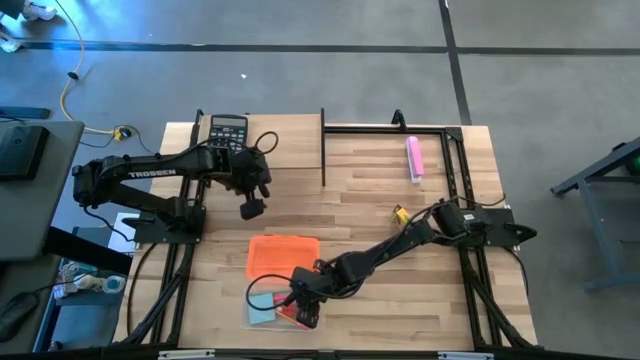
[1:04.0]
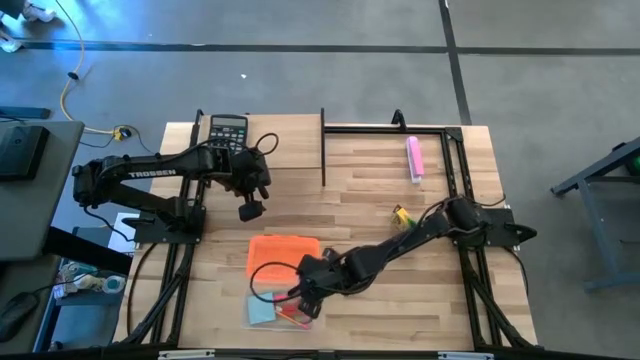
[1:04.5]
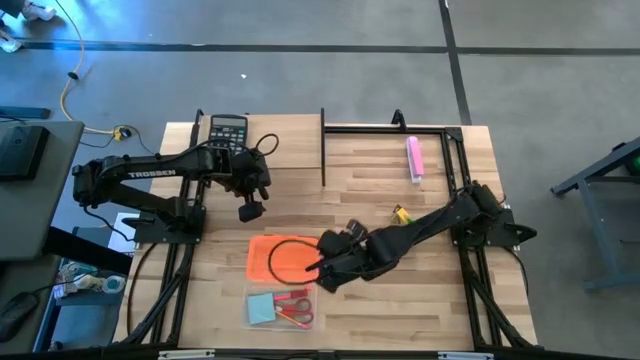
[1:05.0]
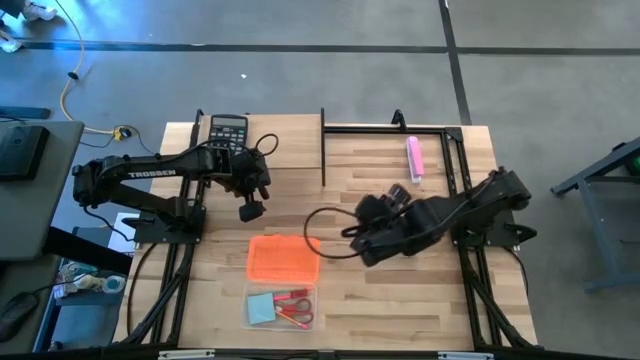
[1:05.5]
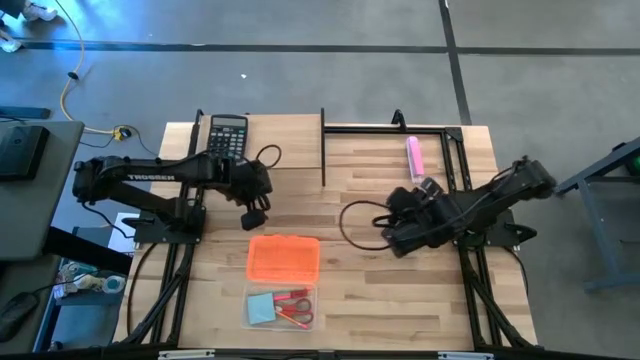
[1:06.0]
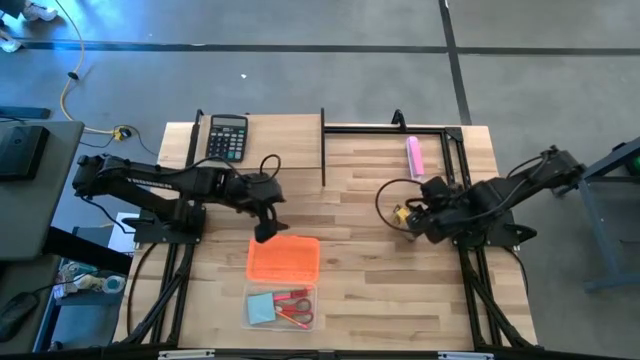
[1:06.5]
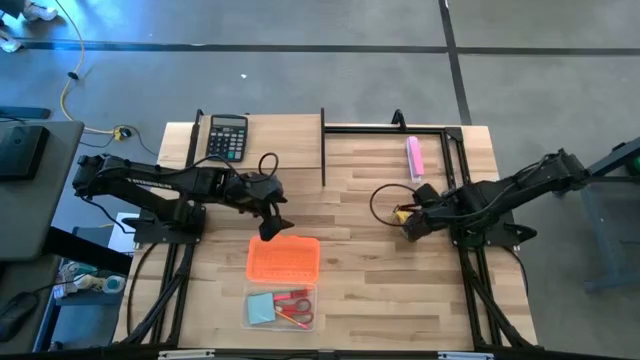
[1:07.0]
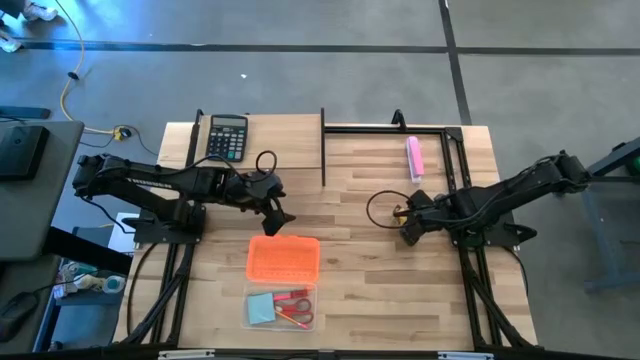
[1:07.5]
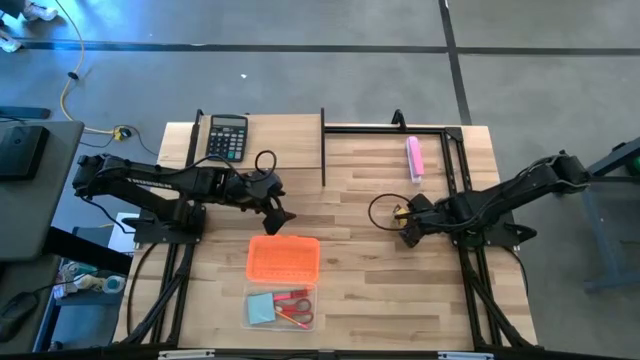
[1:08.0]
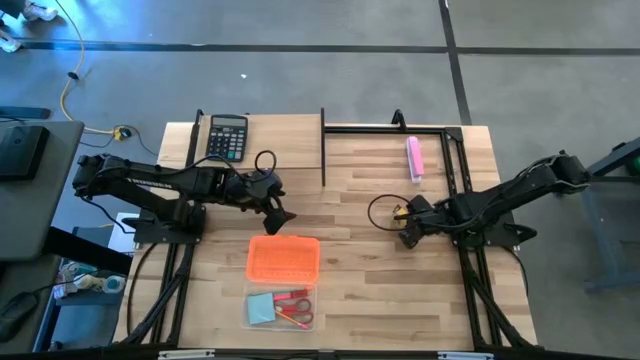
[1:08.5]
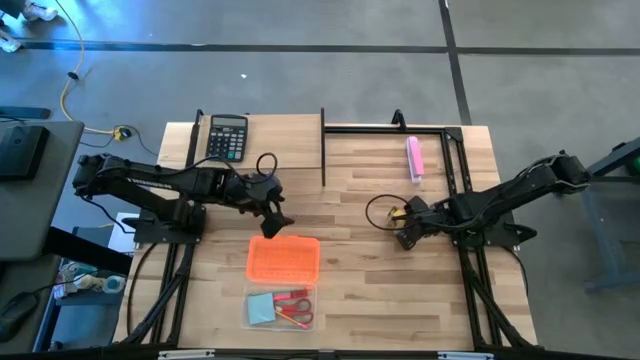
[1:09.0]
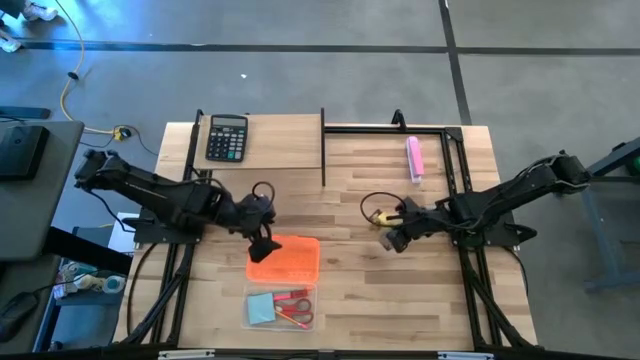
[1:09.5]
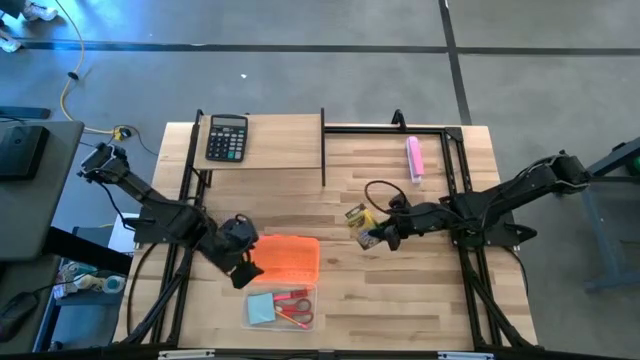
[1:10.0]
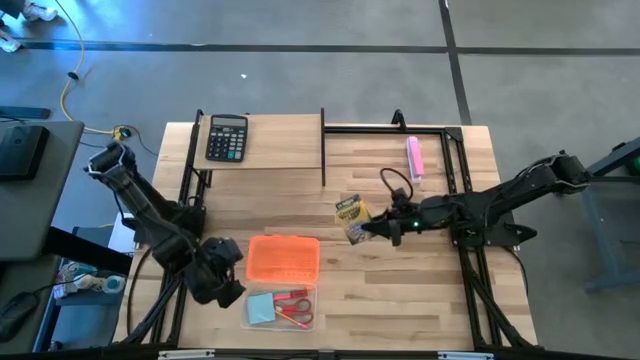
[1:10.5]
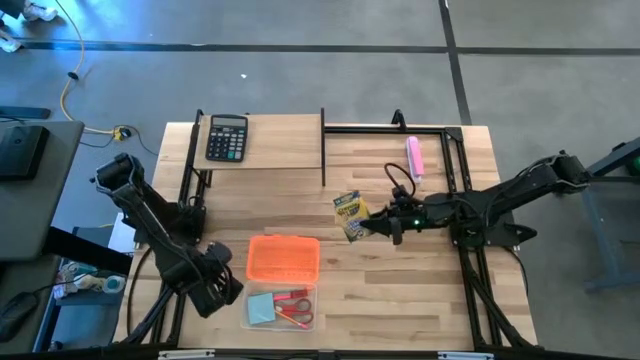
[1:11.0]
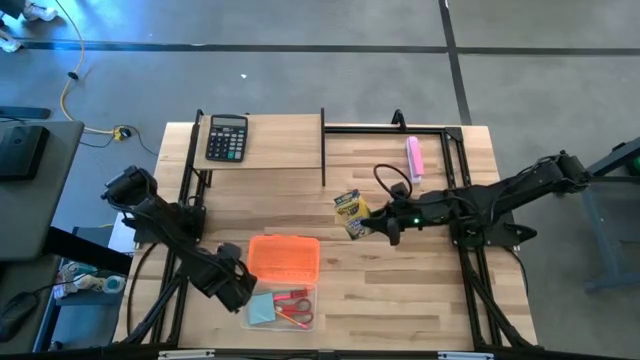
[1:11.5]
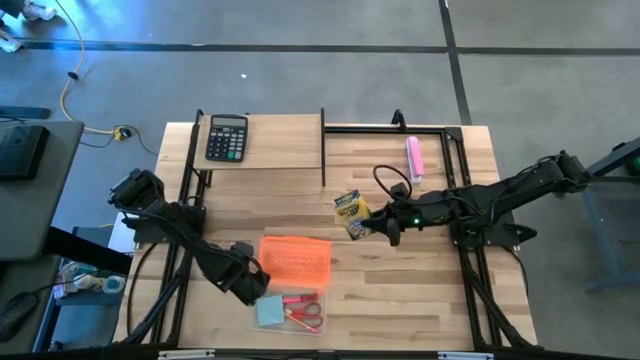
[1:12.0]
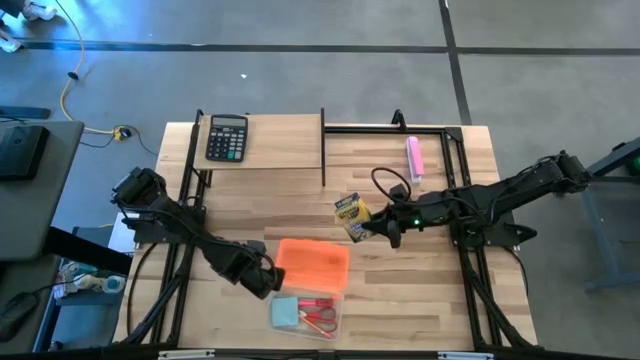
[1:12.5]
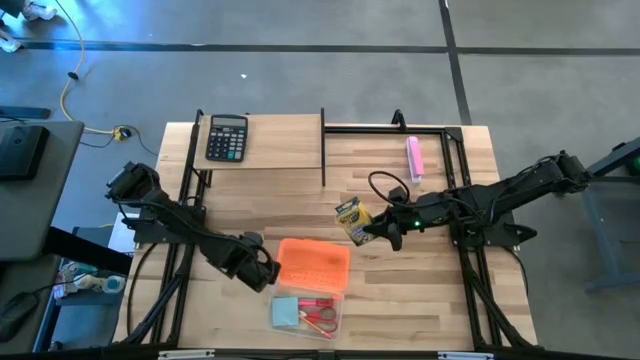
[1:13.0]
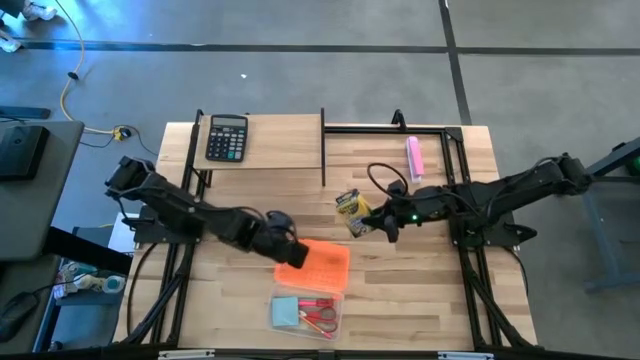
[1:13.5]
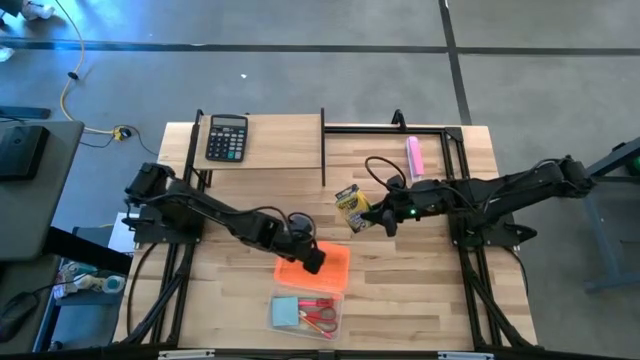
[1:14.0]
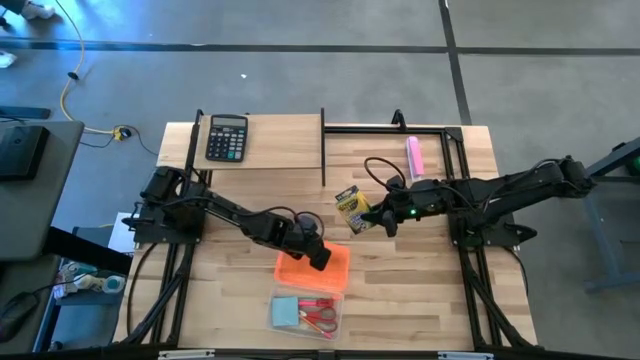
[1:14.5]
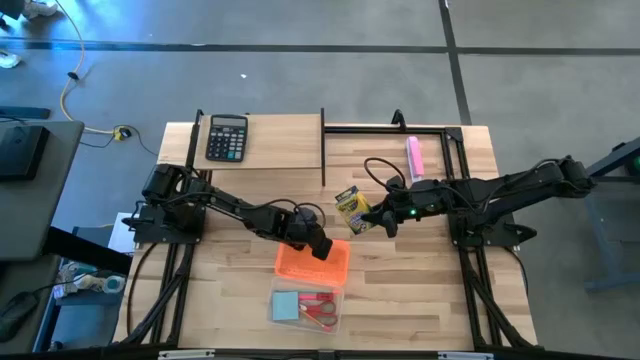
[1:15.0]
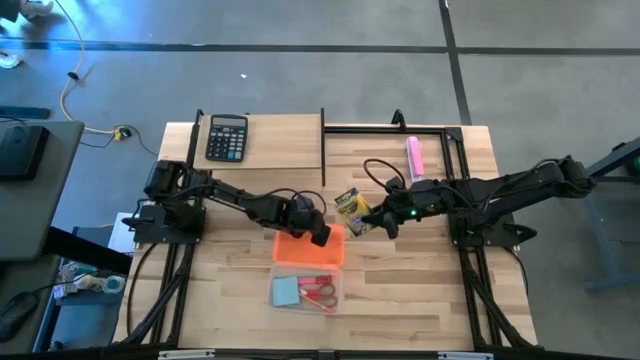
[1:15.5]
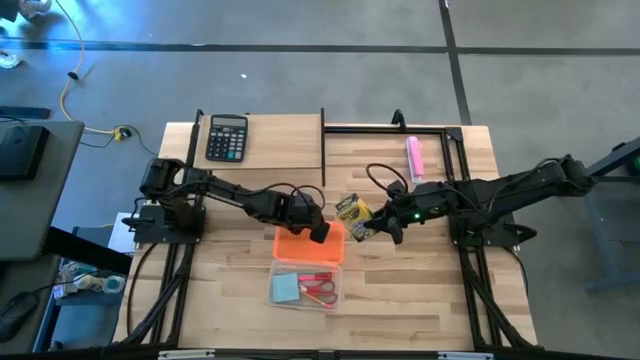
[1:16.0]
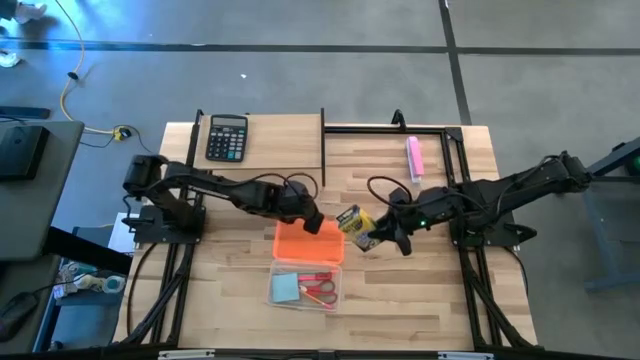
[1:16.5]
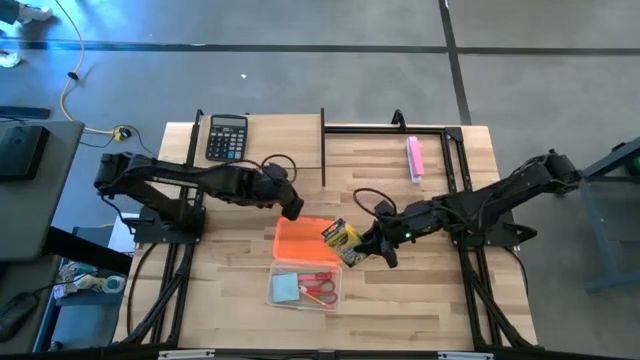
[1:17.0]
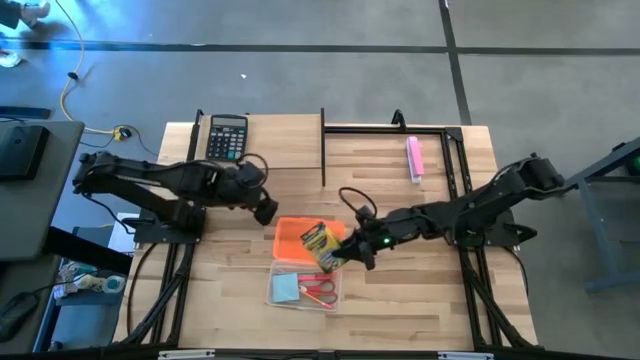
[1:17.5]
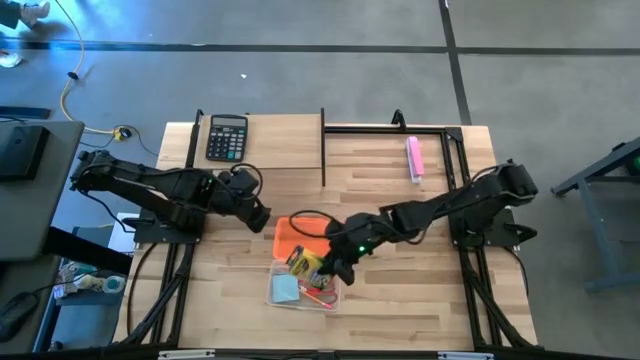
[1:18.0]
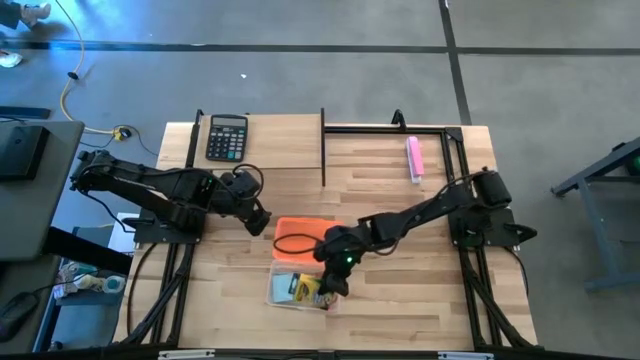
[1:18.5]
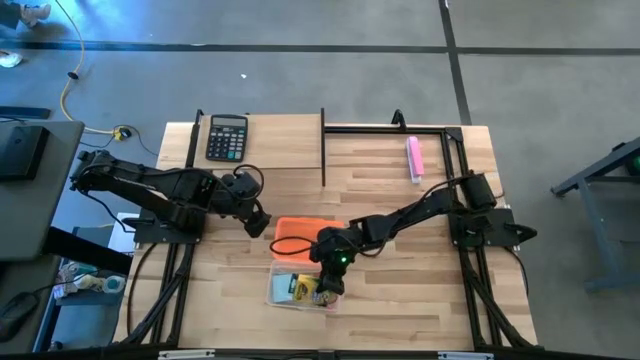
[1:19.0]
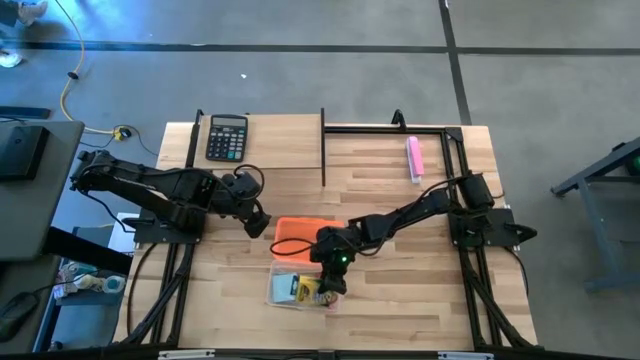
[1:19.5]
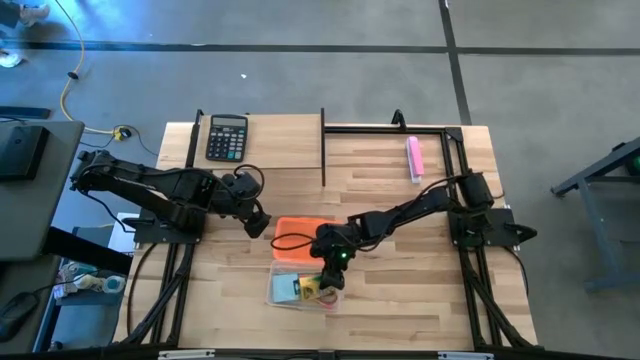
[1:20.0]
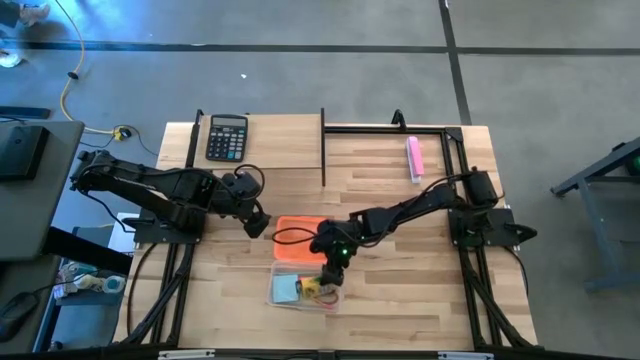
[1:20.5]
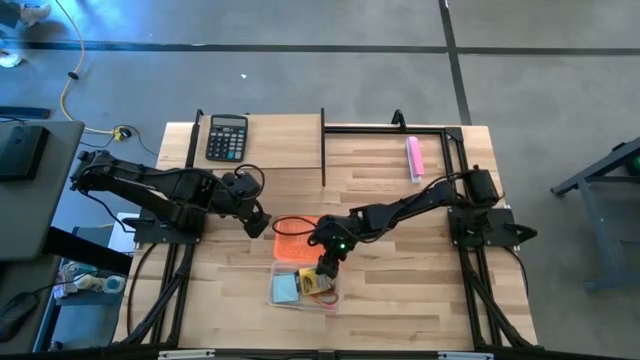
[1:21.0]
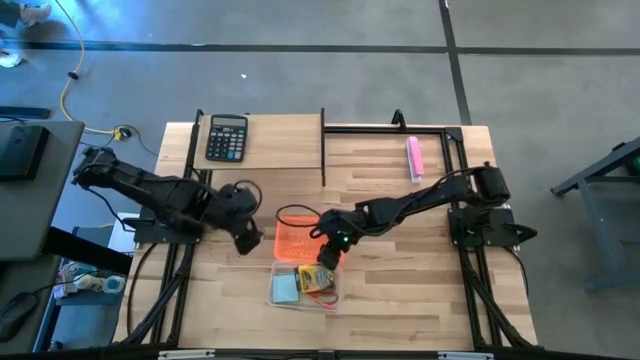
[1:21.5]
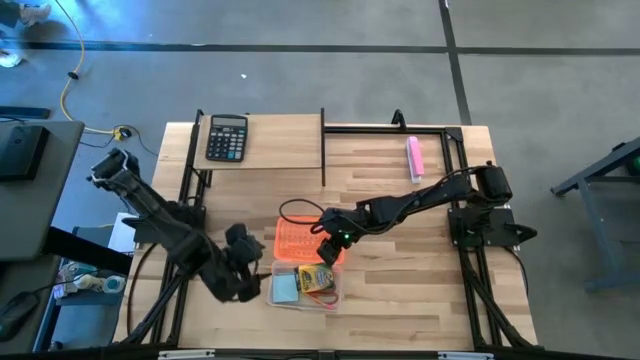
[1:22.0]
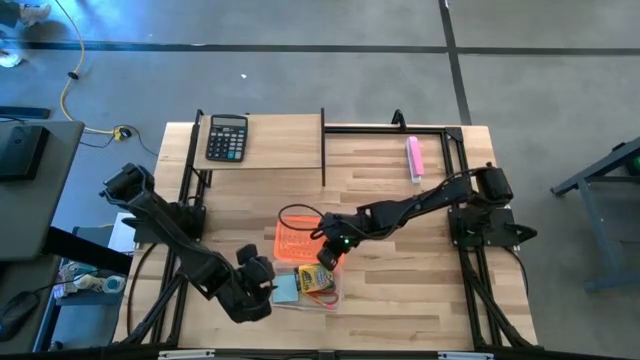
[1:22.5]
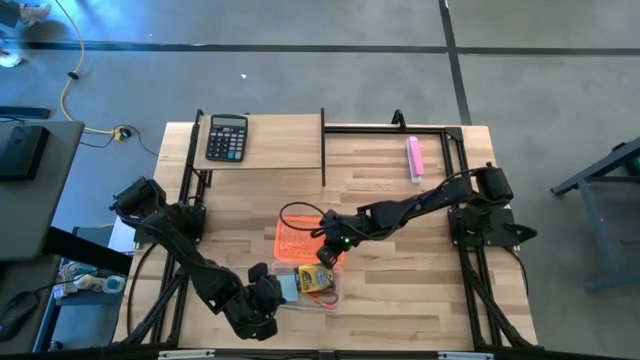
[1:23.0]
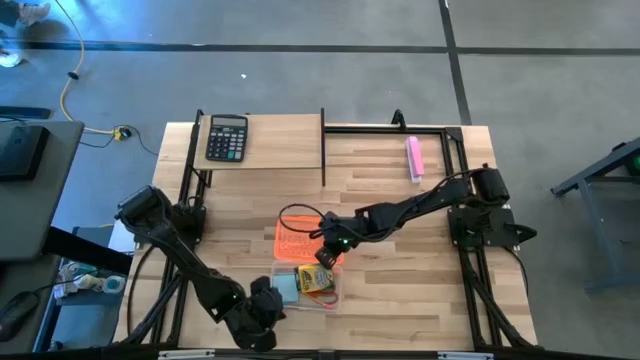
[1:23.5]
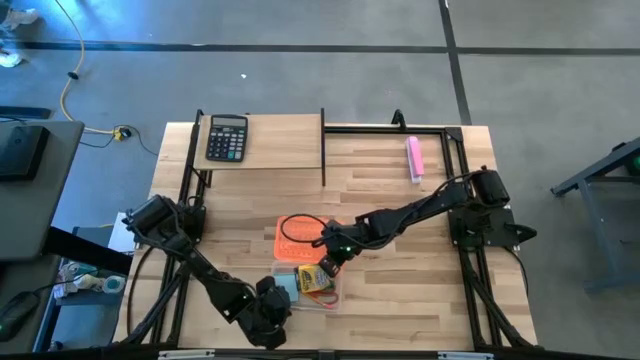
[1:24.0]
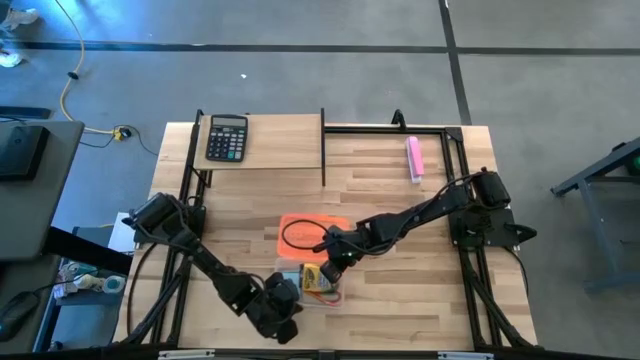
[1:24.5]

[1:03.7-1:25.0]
Task: Pack school essentials
Put the yellow crayon box in the orange supply box

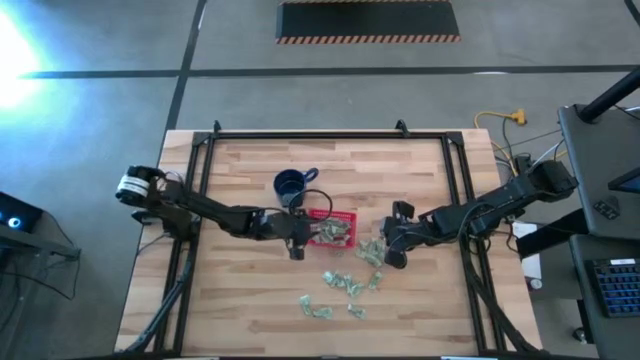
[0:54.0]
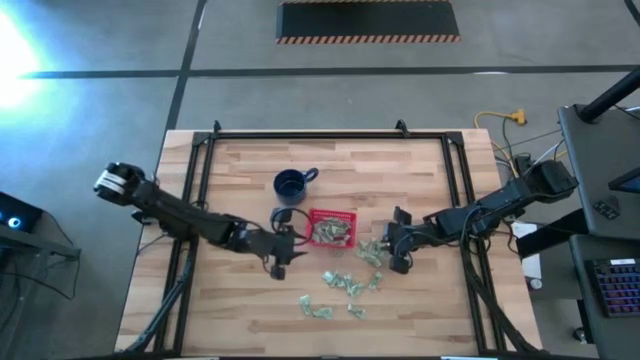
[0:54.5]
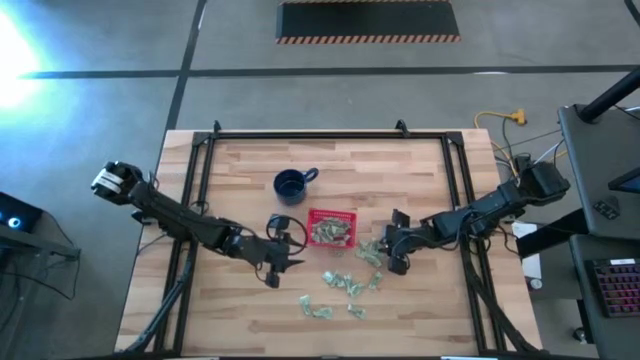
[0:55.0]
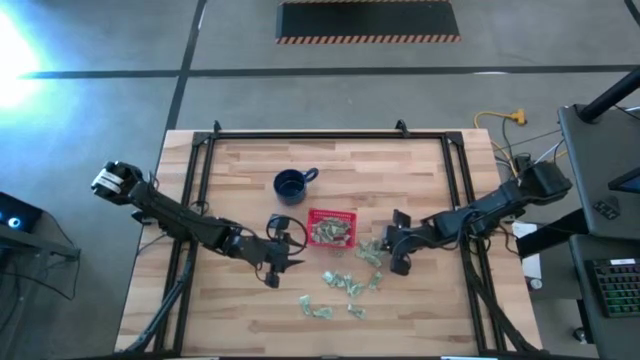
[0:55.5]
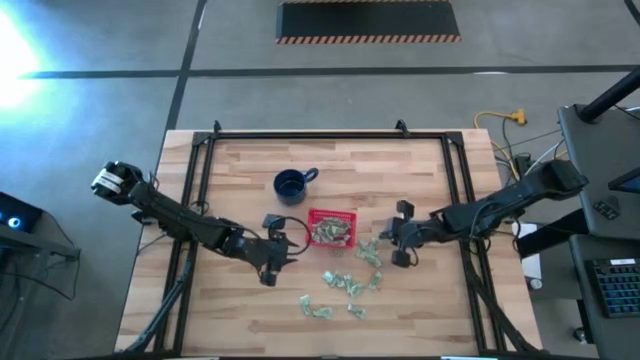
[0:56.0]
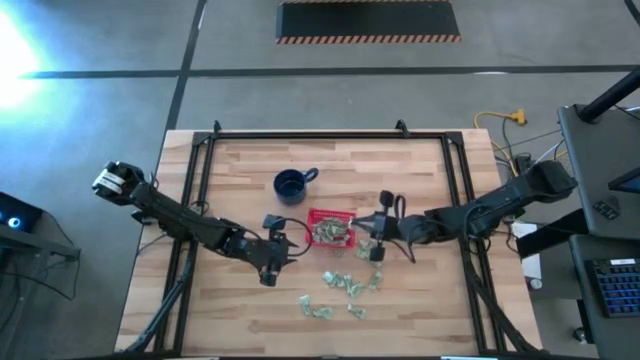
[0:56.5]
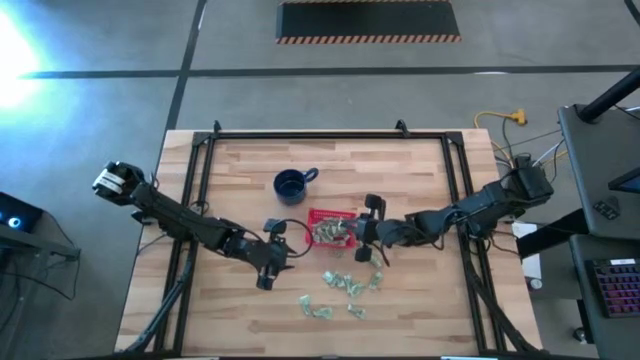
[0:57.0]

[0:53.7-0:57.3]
Task: Pick and place Stevia / Truvia into bins
Put the white stevia packet into the red basket
